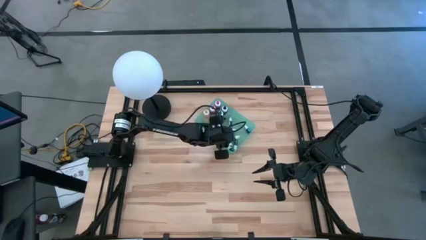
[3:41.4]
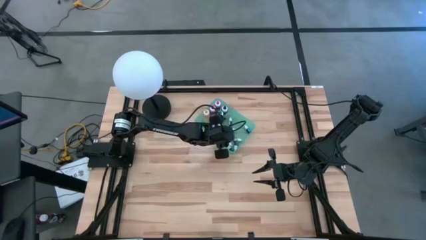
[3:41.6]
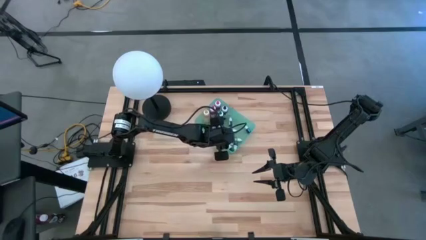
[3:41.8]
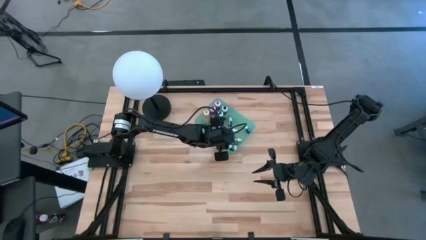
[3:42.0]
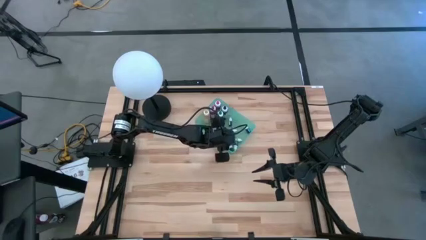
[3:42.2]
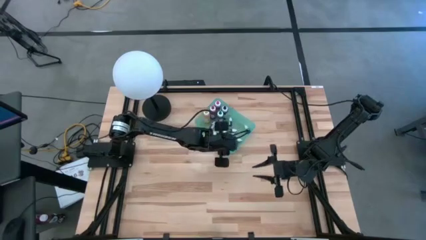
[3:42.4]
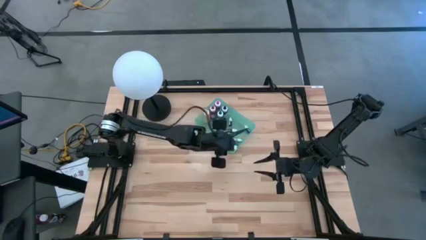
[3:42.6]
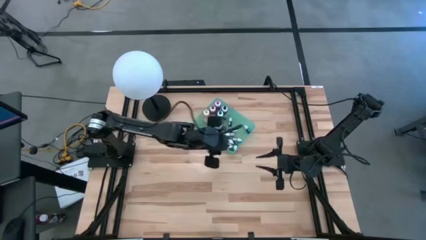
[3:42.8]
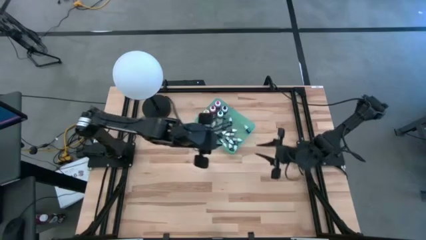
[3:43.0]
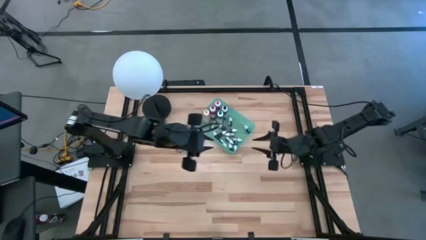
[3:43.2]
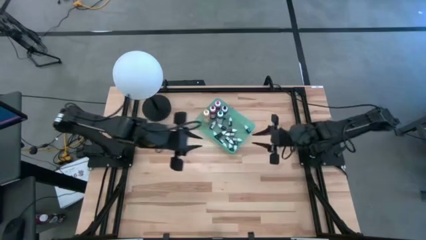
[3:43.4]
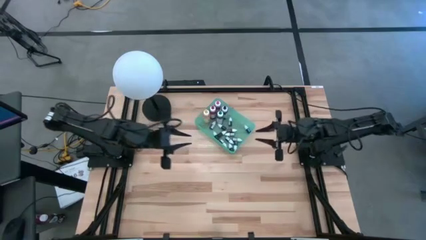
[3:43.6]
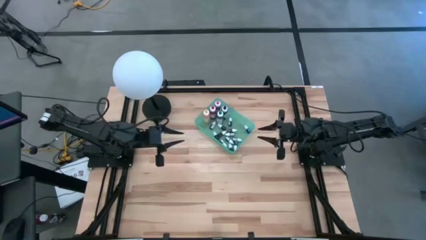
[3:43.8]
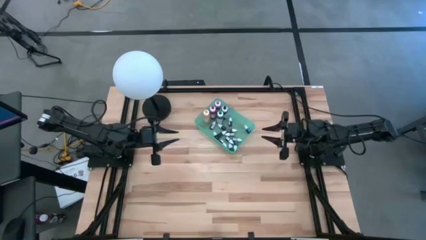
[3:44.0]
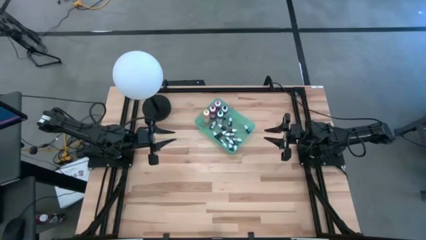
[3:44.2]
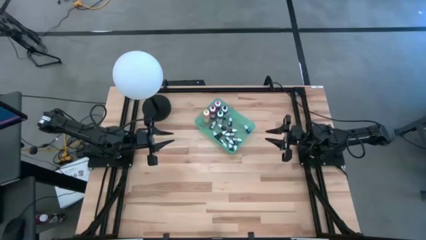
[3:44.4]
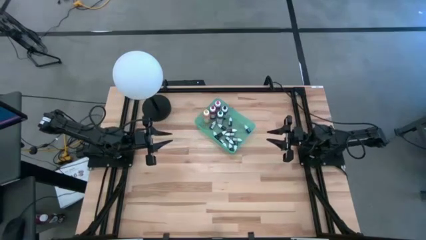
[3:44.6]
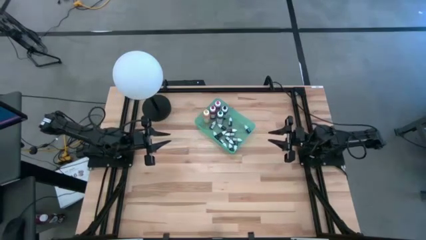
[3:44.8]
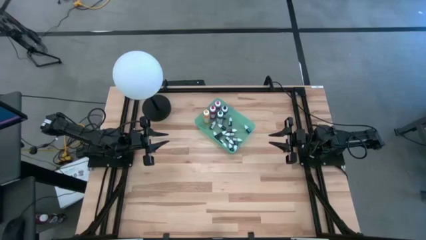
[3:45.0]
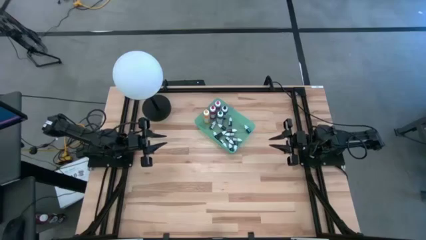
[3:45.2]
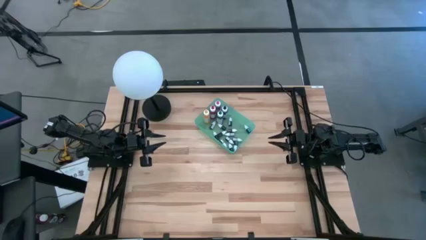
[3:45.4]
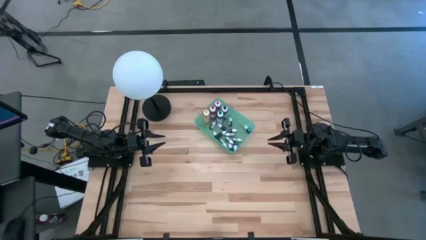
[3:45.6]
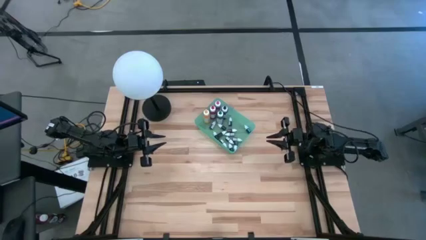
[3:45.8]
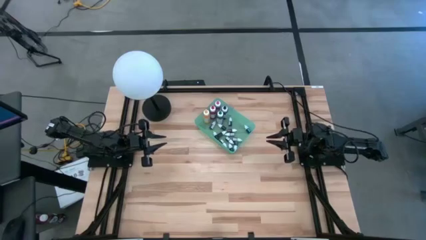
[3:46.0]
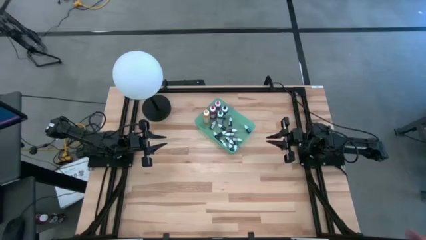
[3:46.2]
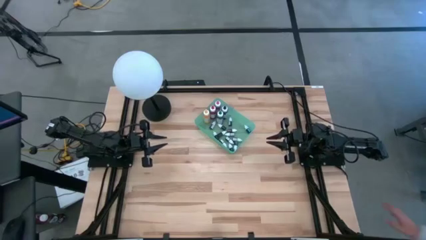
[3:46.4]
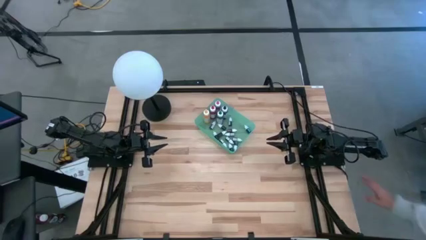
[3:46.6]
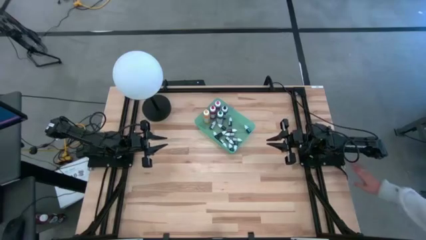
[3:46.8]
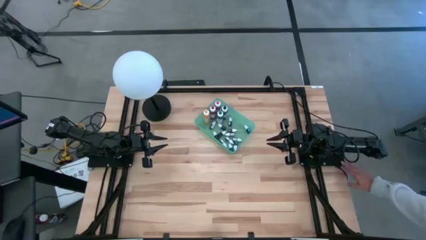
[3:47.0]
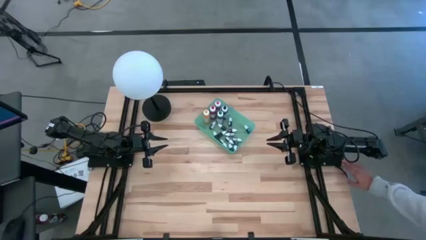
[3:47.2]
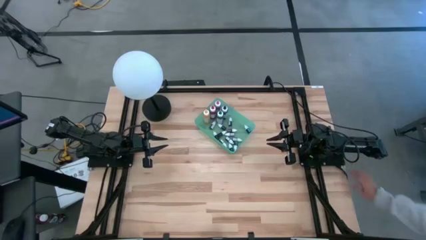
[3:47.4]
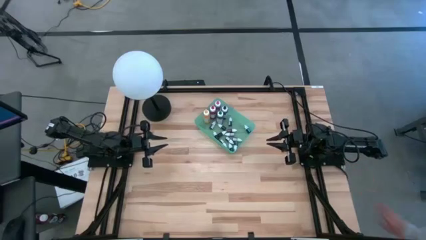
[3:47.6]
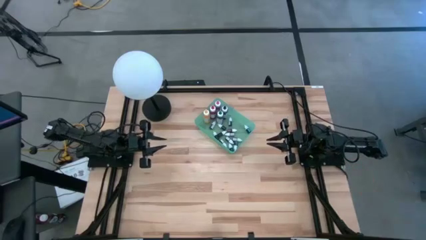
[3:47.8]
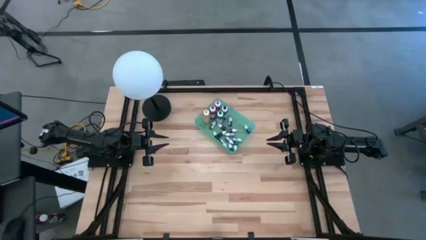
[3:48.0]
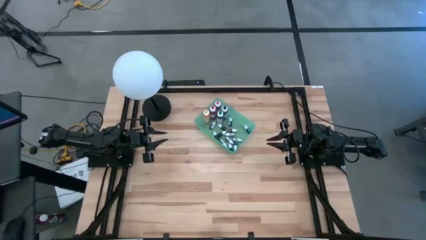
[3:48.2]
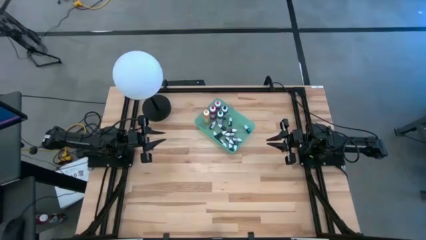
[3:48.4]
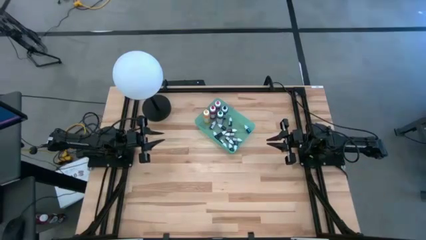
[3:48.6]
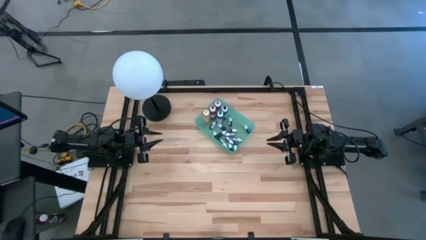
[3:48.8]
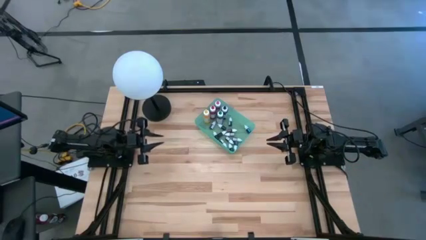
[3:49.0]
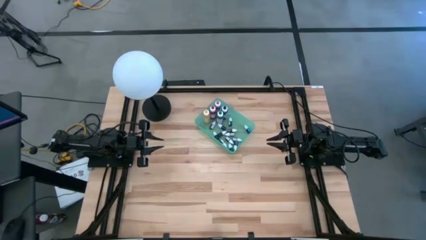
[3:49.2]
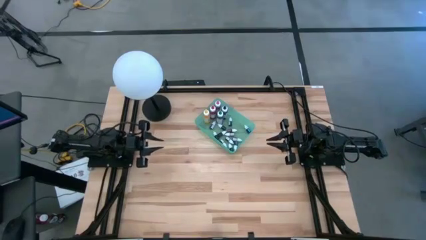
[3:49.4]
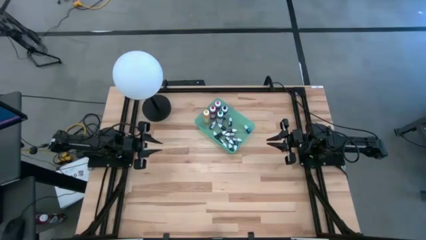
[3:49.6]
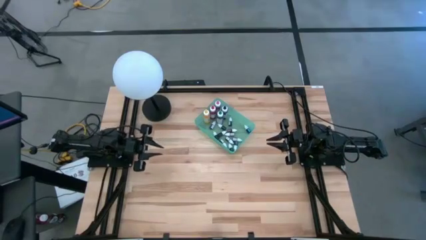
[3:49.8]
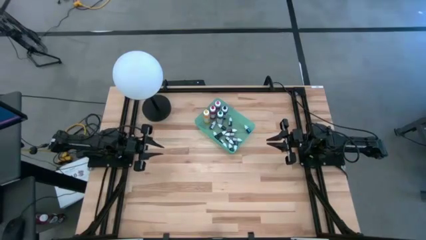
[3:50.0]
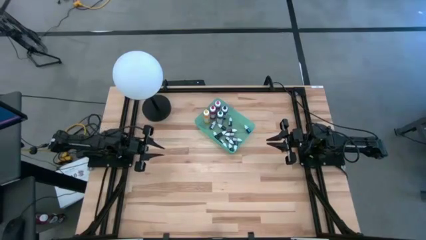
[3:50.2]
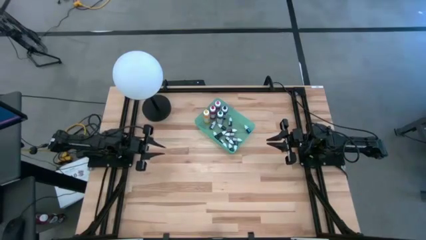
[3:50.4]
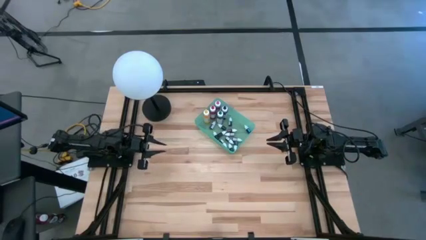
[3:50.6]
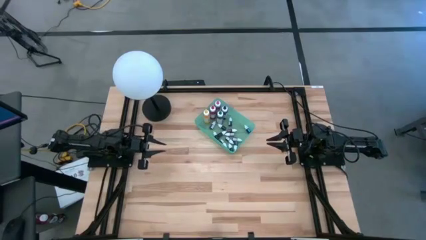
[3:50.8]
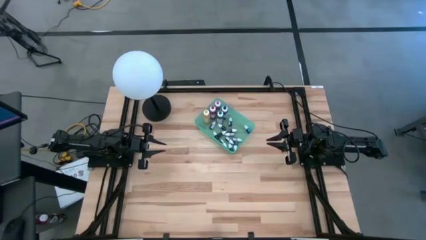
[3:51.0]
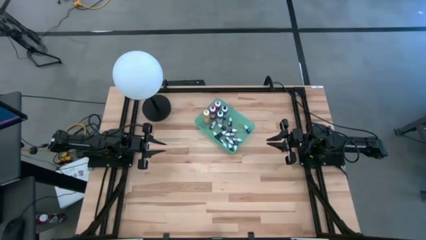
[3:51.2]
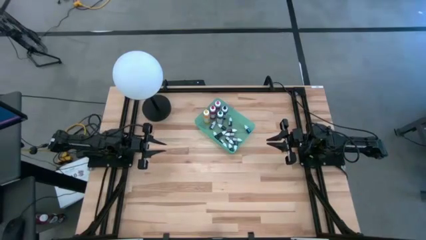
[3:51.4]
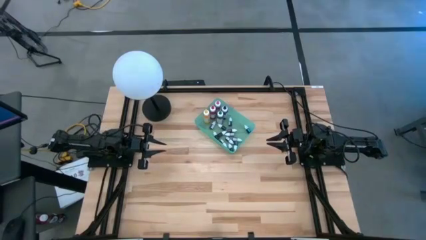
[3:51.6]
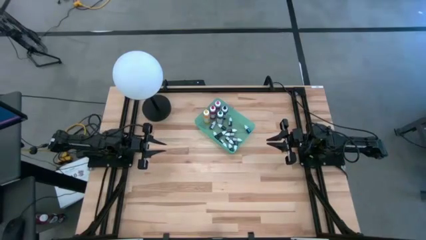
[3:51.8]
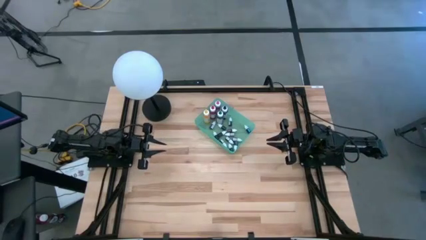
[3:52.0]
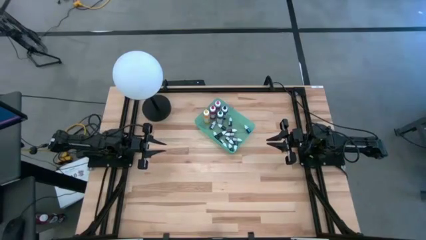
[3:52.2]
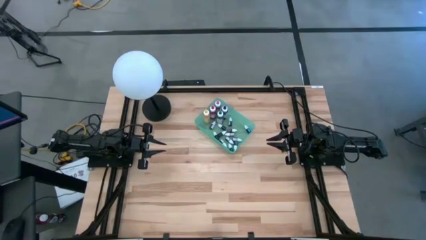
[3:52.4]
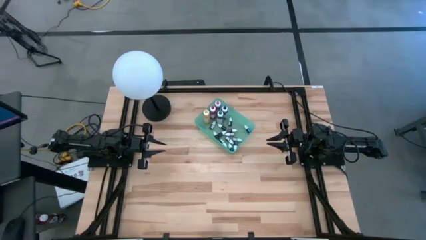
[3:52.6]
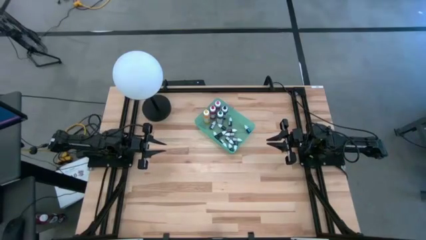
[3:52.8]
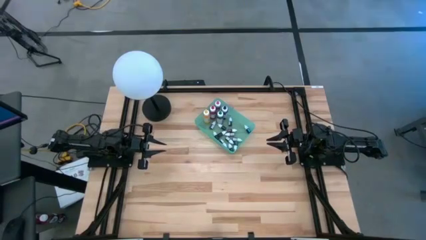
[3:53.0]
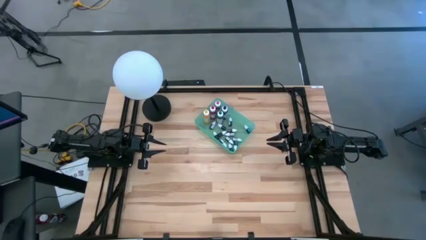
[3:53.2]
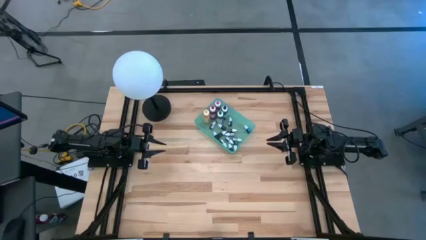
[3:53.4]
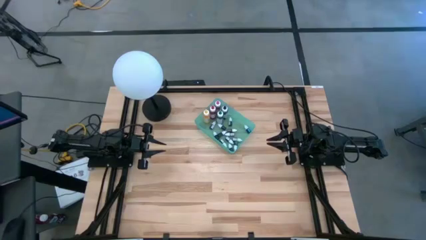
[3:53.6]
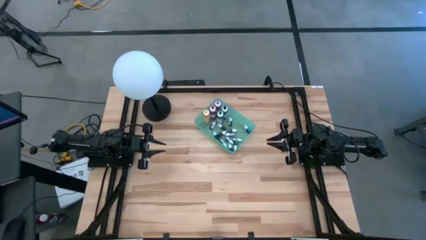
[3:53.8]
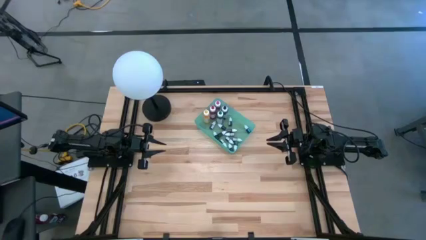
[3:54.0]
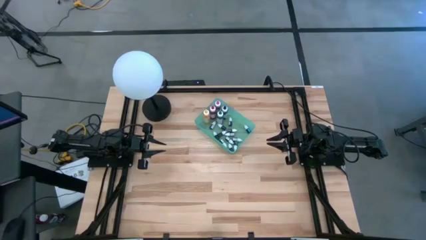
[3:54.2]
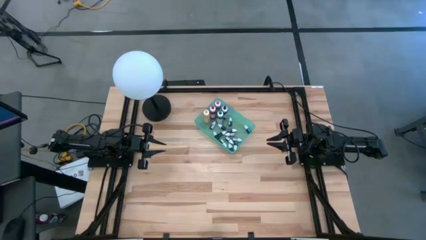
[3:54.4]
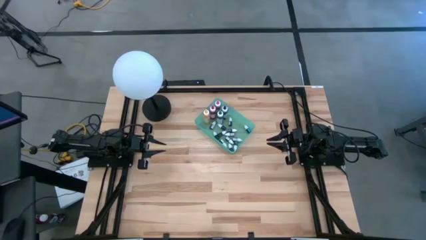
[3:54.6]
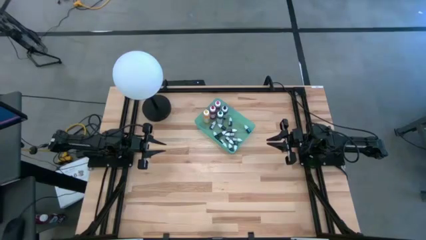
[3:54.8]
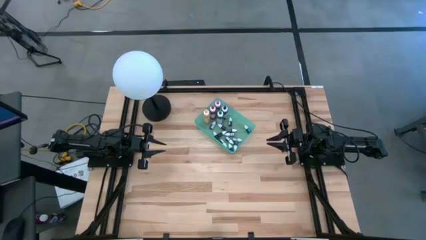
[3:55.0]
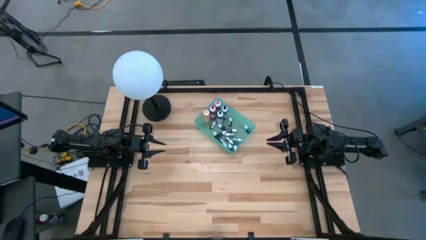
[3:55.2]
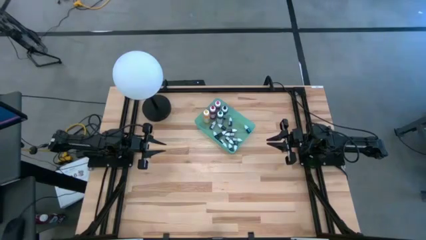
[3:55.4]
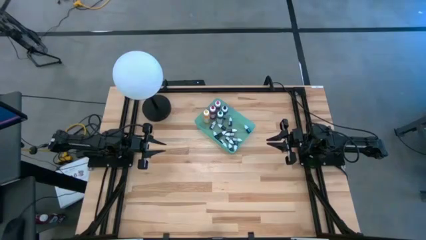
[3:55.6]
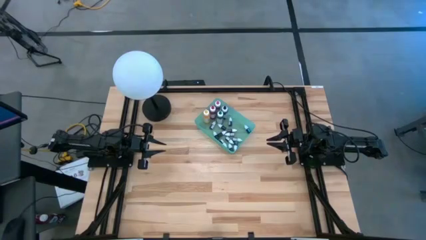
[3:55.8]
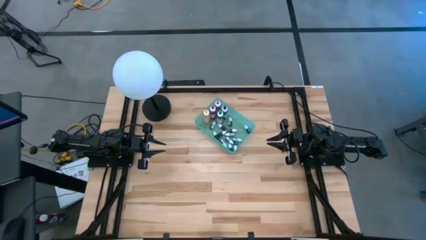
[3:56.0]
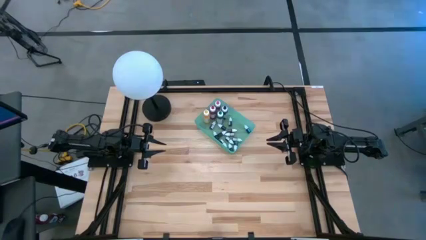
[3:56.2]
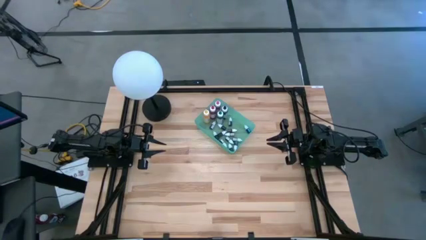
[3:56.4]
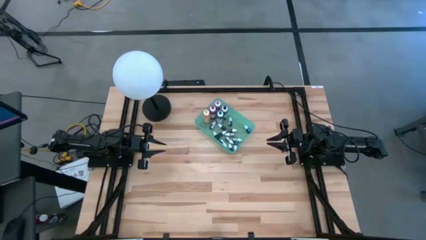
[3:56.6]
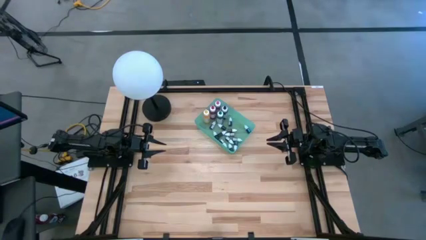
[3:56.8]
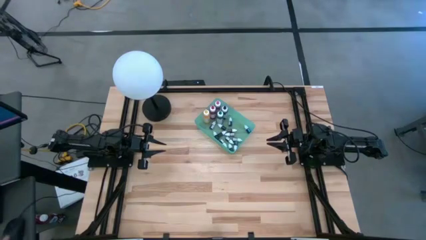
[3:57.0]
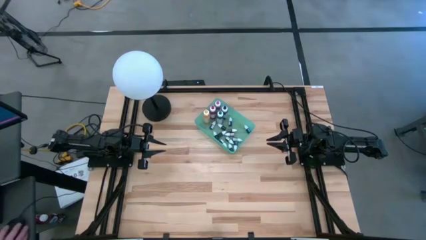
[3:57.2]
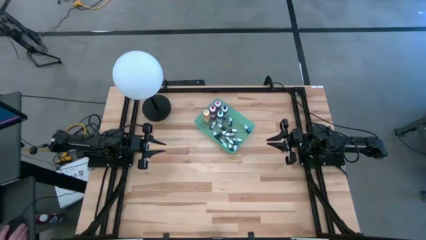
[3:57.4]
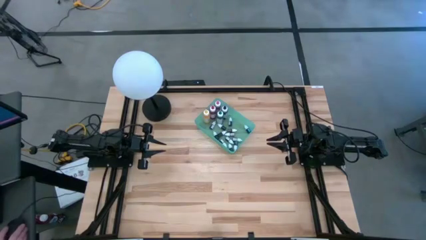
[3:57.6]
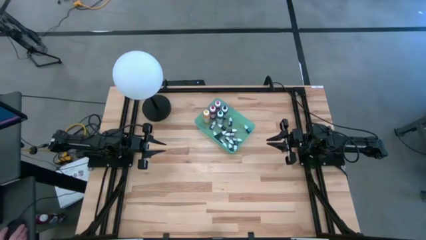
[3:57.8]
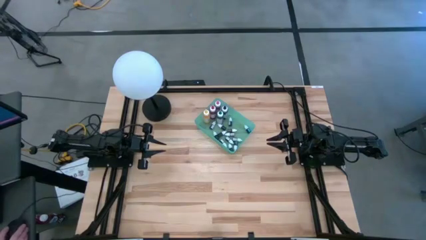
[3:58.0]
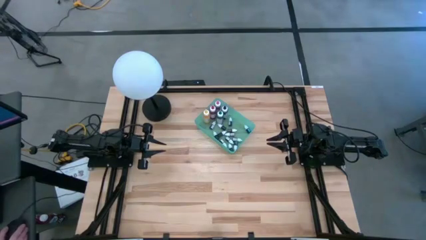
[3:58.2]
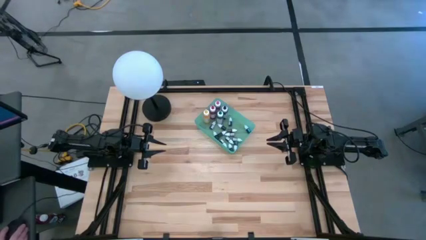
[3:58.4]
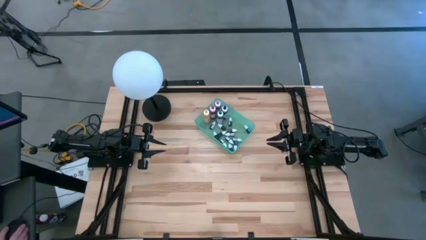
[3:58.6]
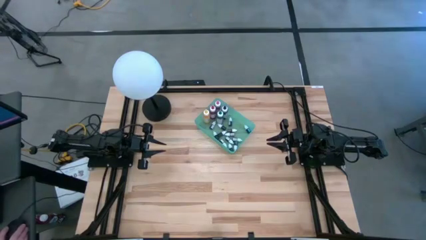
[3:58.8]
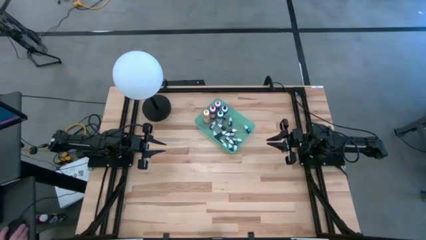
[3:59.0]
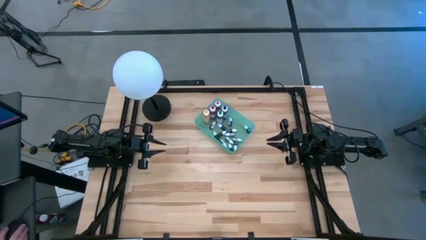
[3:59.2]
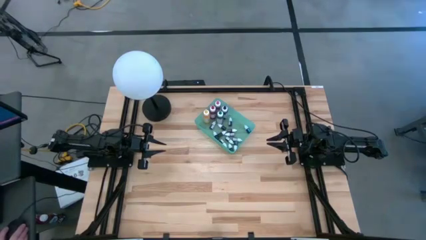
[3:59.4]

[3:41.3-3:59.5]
Task: Pick & Place food coloring
Return to Home Position
